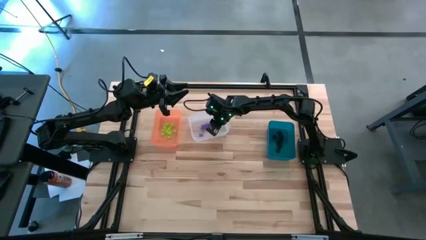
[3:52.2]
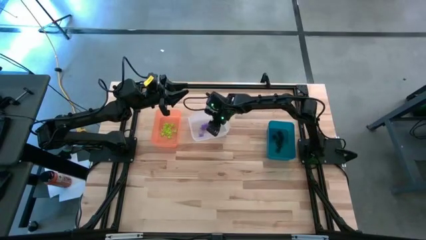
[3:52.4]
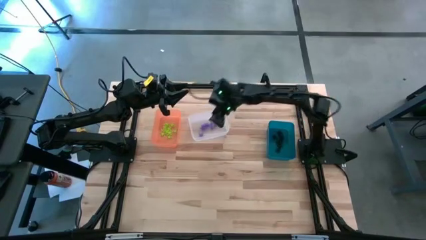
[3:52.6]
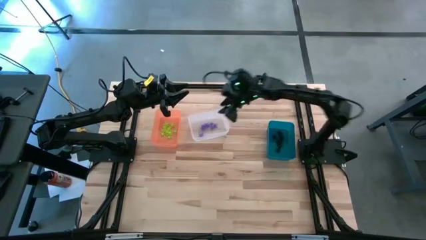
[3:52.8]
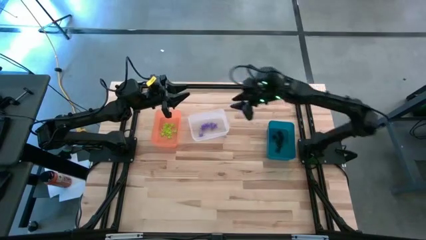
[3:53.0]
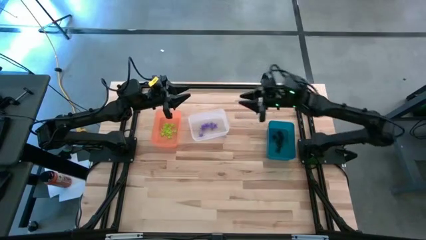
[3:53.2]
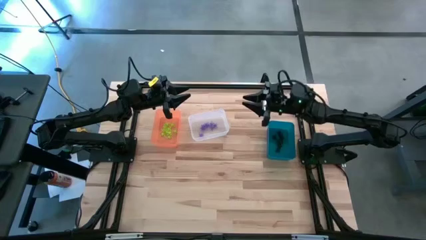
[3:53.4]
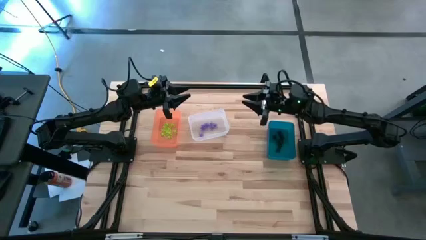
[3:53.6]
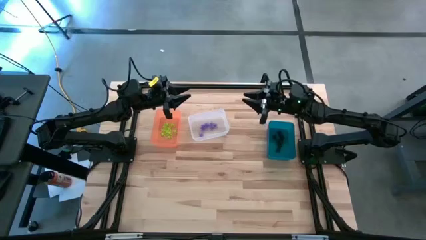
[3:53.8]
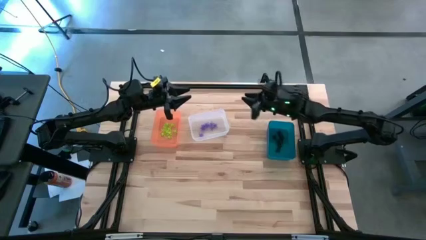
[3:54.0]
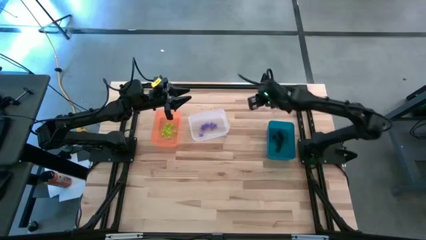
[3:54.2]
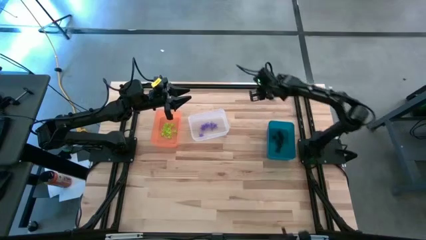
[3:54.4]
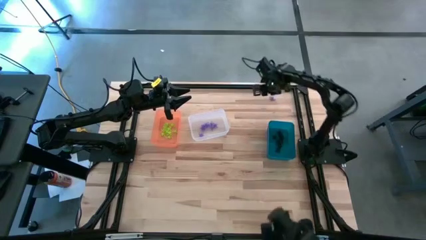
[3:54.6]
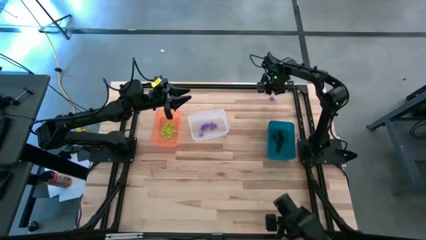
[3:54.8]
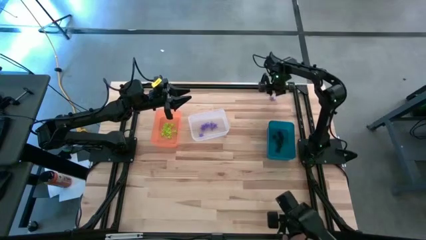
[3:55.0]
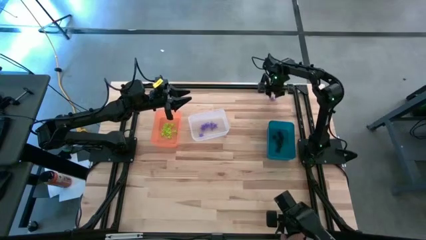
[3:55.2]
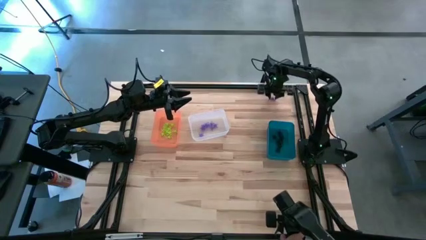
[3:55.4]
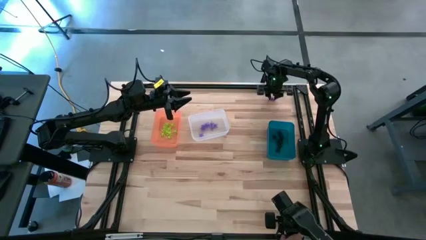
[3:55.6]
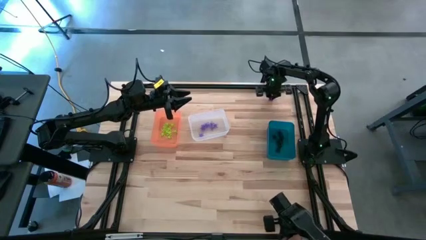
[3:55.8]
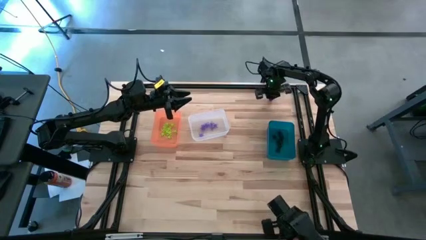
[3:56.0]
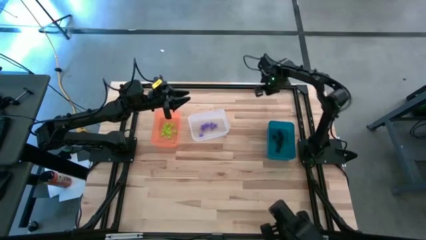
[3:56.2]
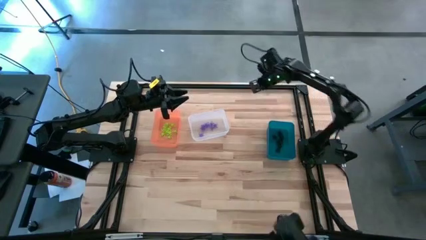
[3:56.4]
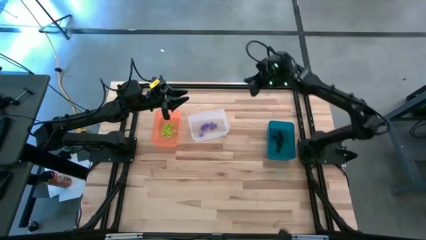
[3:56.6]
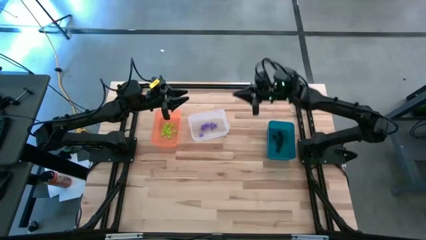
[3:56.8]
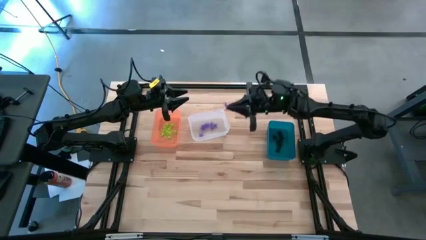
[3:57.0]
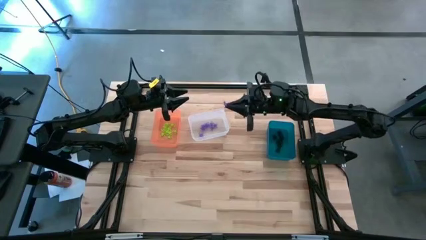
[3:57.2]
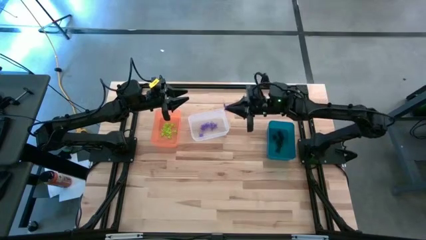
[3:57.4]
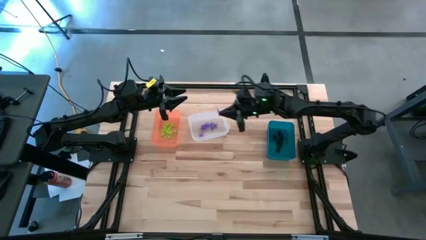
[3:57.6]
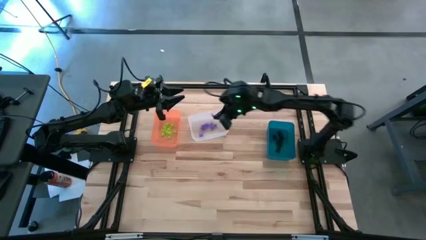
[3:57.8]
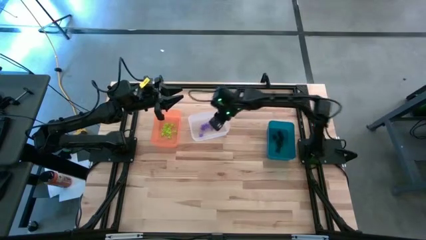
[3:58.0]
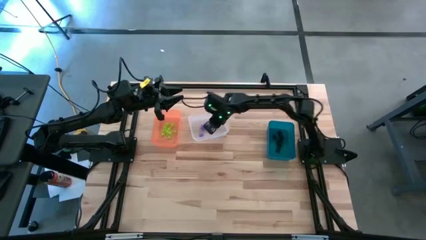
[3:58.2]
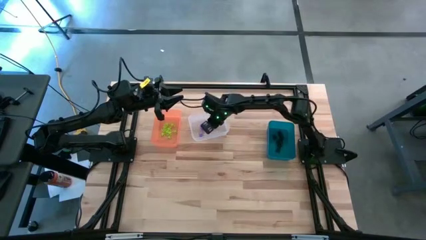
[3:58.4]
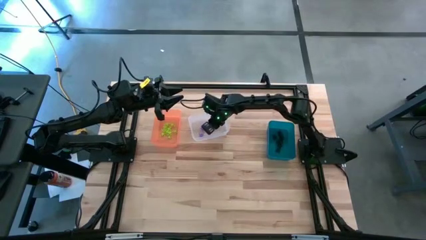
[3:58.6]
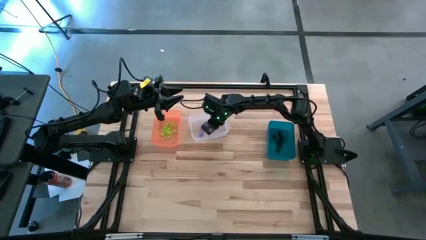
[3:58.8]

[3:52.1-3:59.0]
Task: Sort Halloween decoration
Put the purple spider toy into the transparent bin

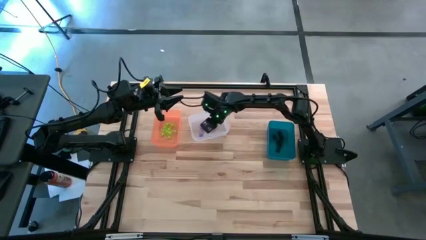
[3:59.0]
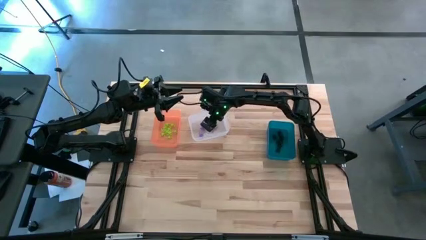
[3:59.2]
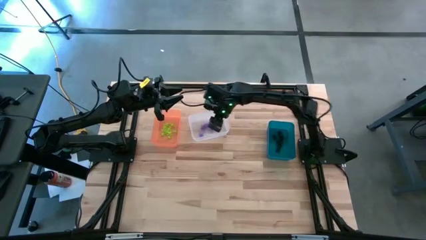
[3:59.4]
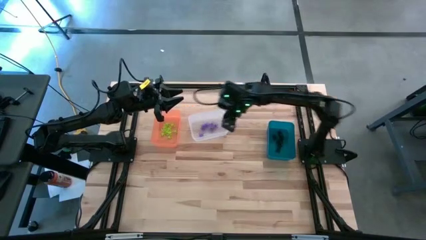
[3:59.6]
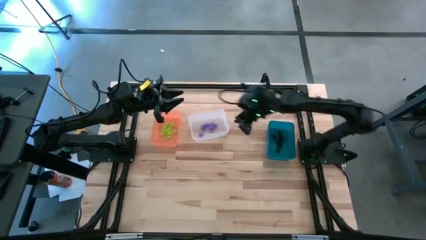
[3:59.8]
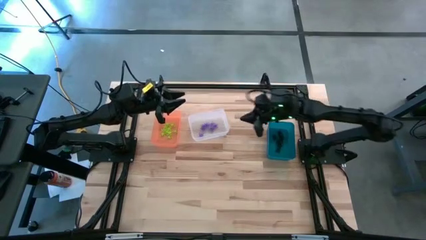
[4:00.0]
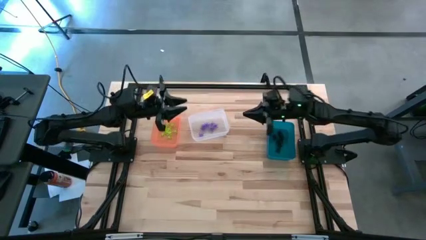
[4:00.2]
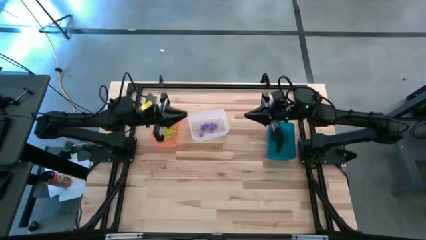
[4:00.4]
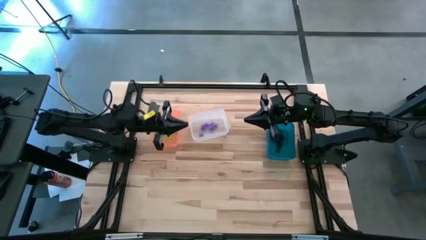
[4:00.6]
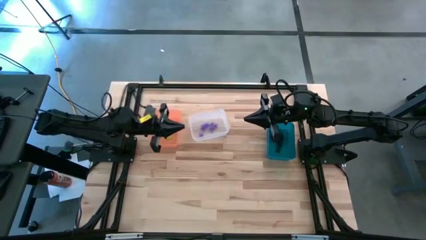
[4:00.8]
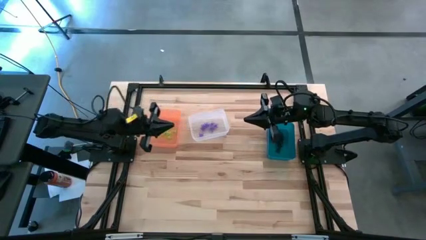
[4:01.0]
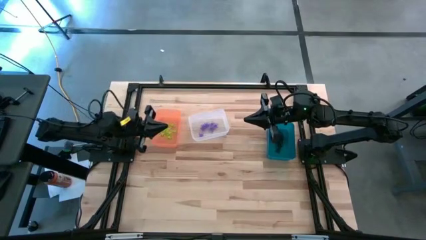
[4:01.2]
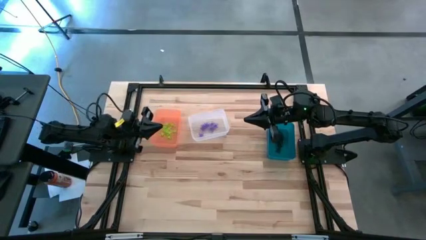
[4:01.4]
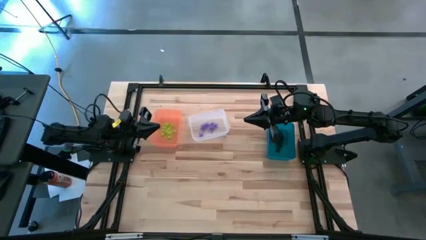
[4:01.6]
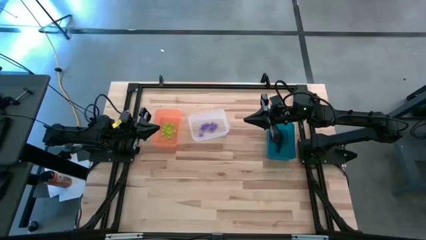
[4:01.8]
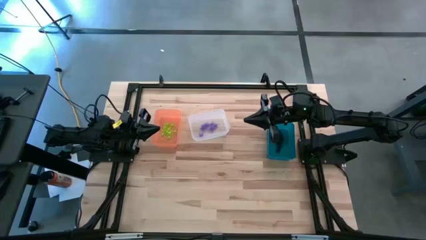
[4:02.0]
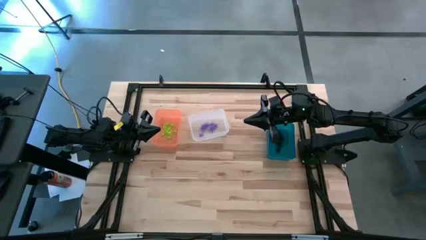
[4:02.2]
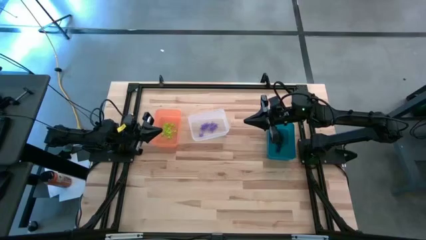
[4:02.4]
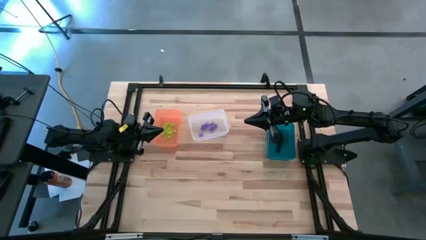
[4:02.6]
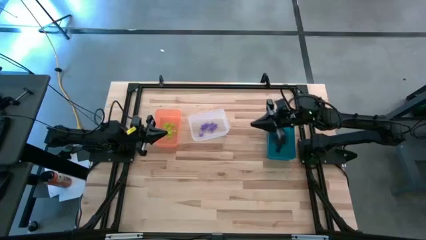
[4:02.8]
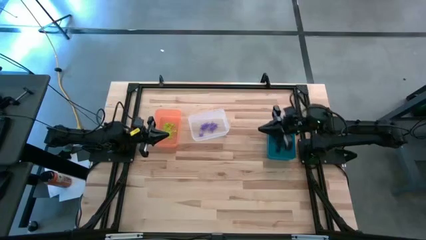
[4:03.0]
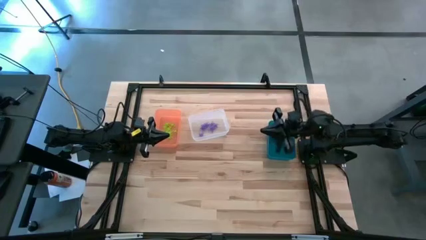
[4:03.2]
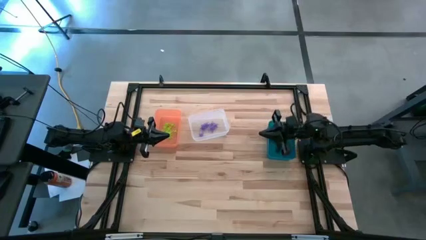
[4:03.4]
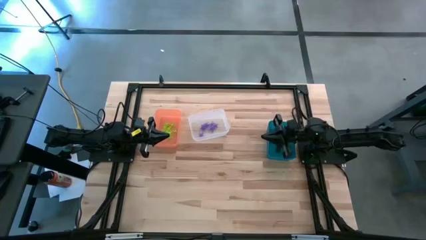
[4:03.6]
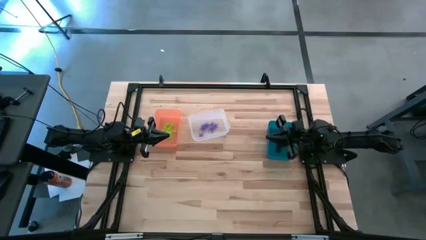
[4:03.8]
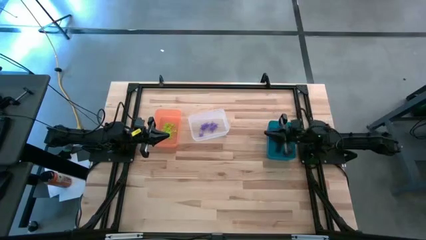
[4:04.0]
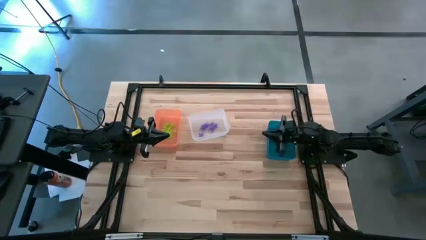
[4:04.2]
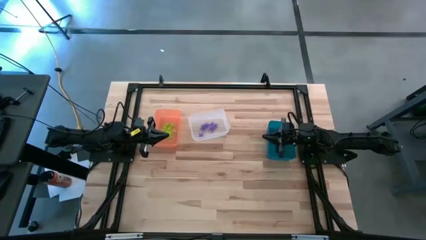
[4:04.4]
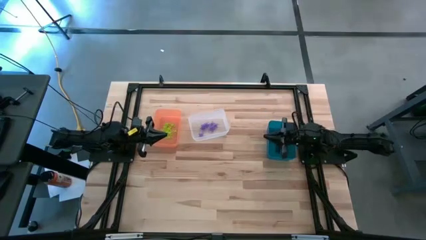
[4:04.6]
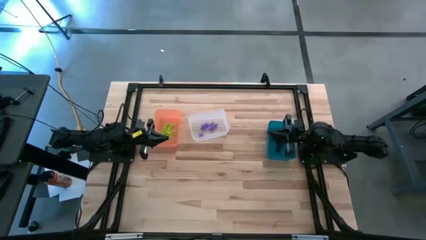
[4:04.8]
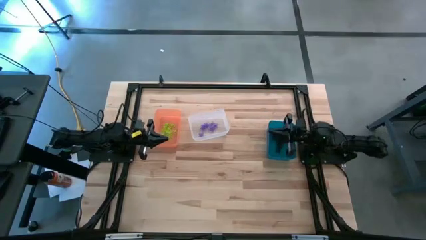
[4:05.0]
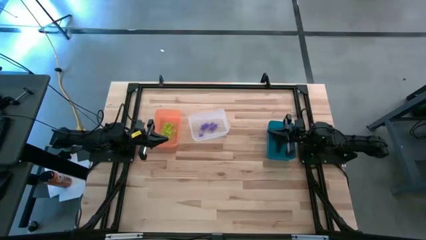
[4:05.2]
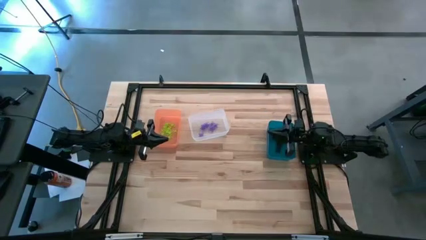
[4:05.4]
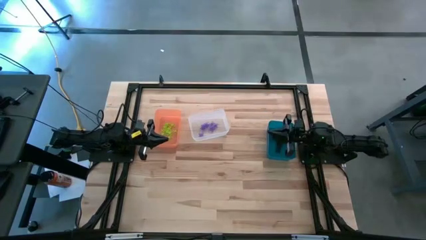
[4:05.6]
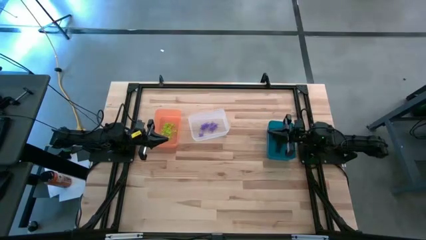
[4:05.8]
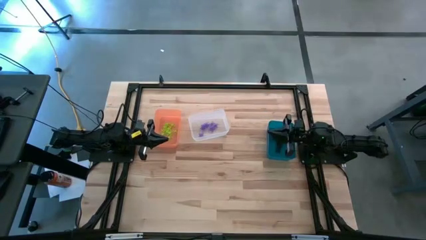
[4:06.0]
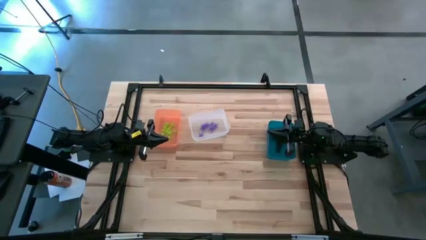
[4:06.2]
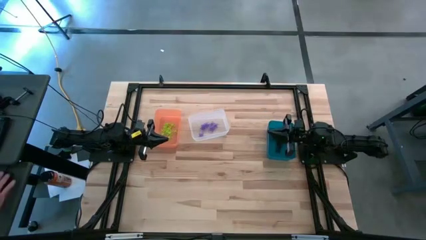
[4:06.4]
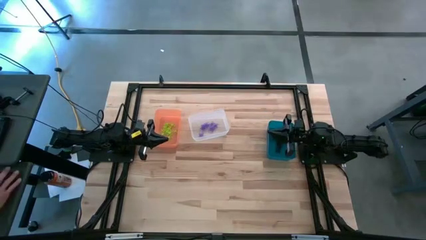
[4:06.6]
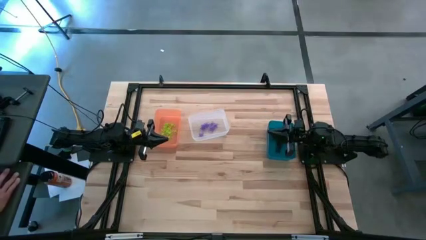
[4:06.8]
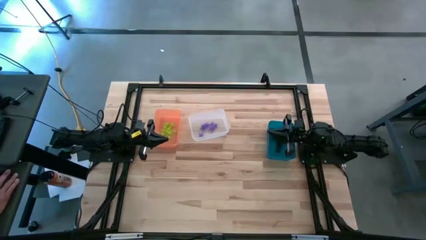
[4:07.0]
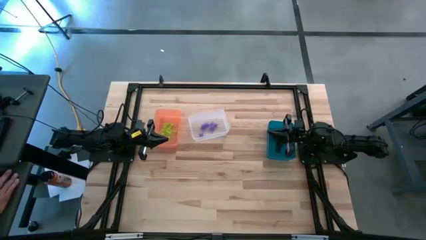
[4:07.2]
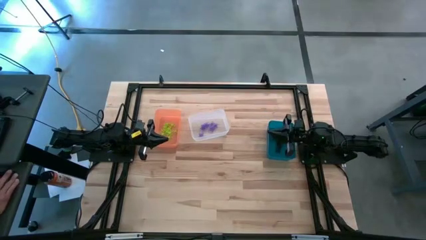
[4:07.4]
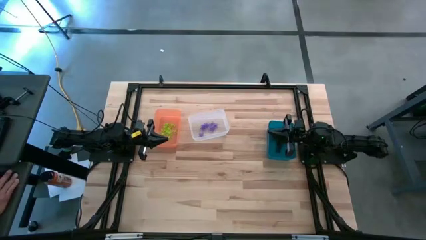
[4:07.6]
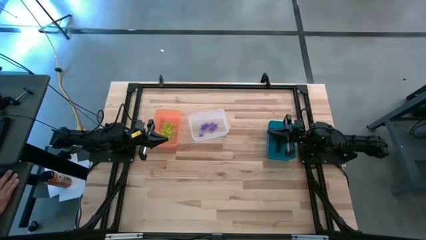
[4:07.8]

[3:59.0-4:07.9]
Return to Home Position
